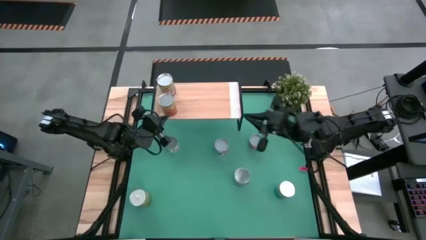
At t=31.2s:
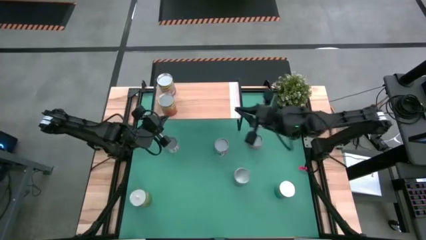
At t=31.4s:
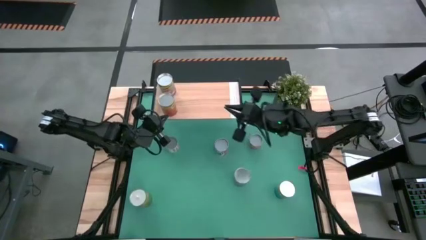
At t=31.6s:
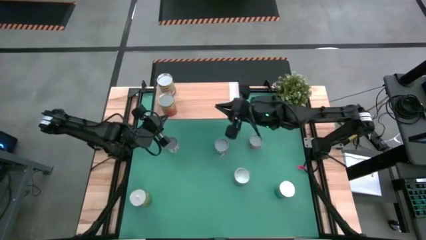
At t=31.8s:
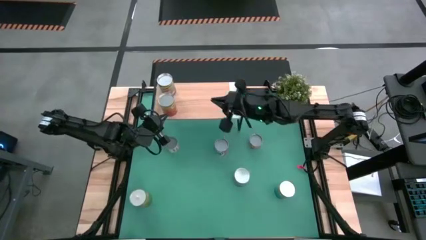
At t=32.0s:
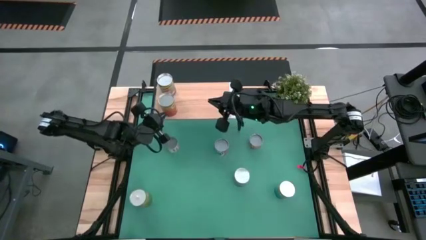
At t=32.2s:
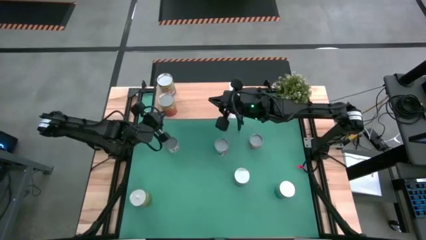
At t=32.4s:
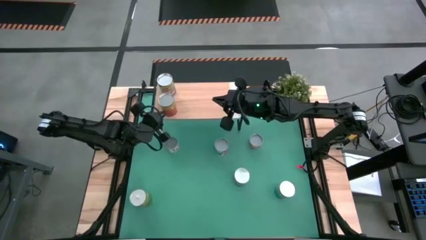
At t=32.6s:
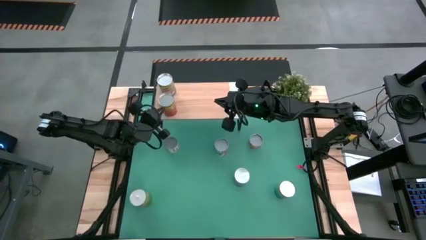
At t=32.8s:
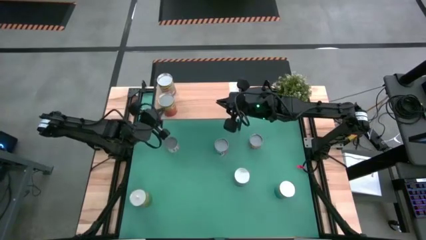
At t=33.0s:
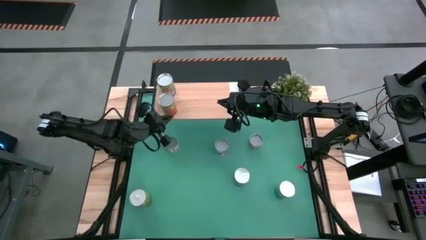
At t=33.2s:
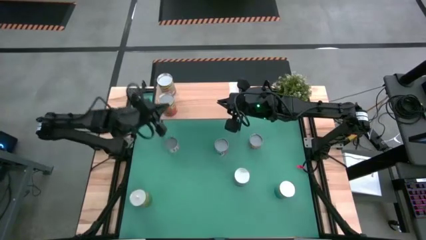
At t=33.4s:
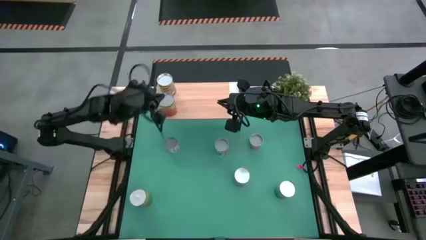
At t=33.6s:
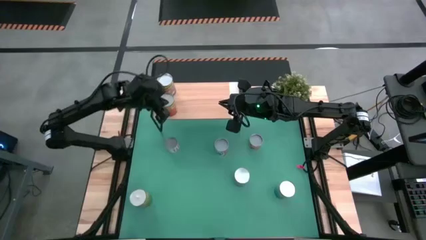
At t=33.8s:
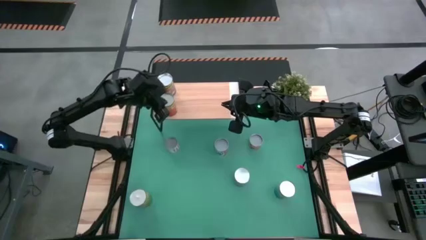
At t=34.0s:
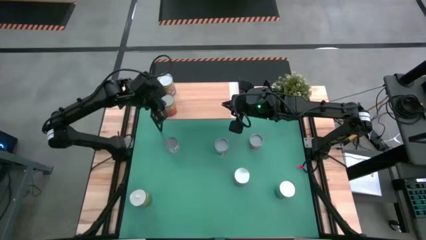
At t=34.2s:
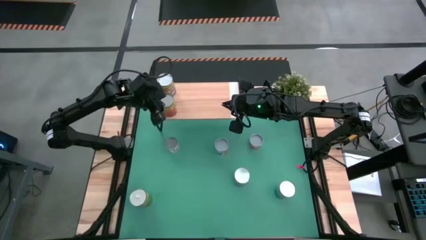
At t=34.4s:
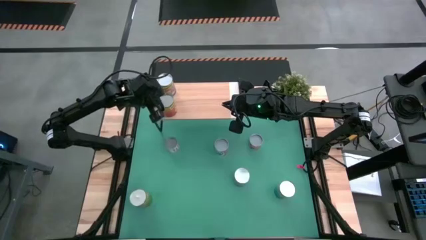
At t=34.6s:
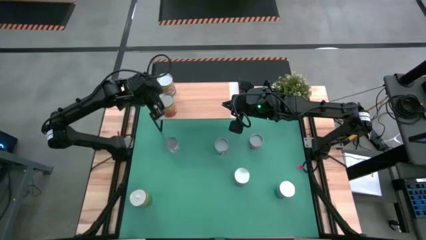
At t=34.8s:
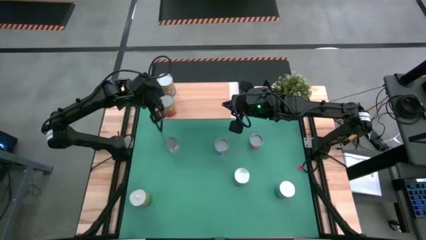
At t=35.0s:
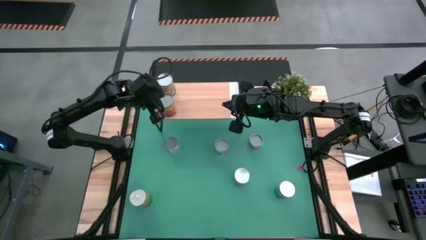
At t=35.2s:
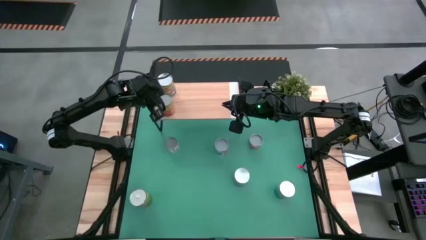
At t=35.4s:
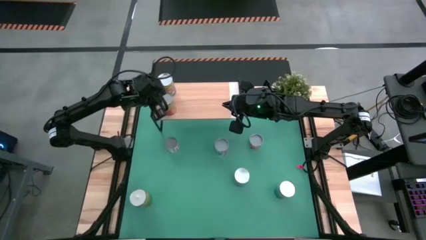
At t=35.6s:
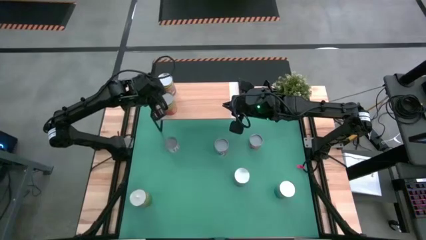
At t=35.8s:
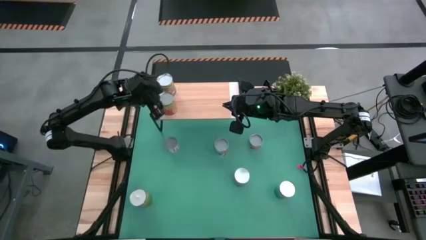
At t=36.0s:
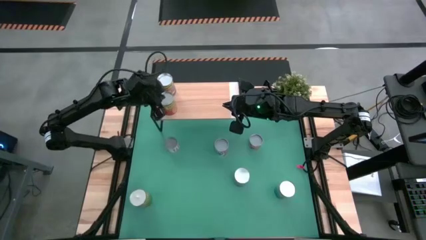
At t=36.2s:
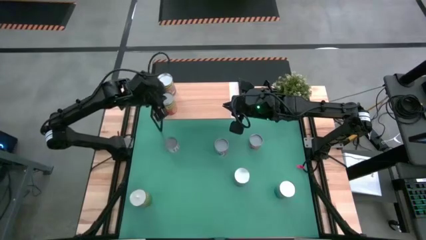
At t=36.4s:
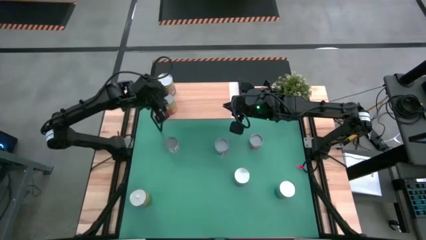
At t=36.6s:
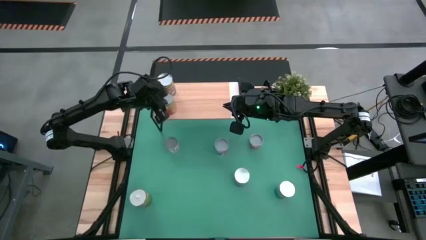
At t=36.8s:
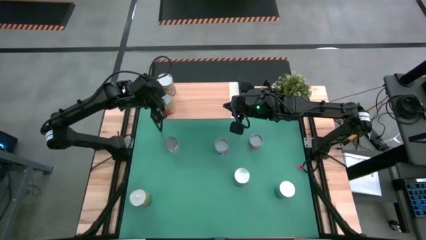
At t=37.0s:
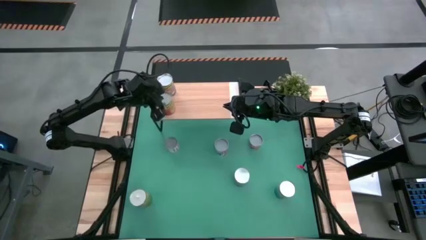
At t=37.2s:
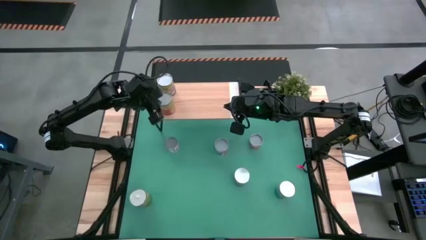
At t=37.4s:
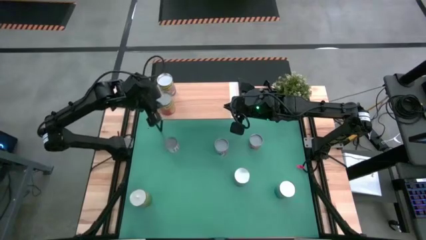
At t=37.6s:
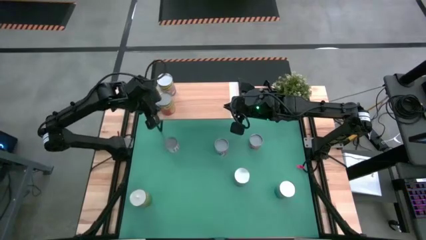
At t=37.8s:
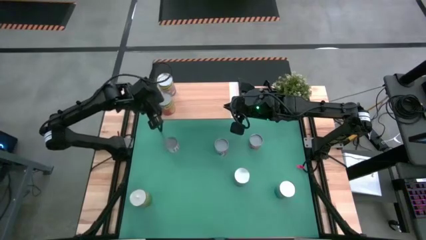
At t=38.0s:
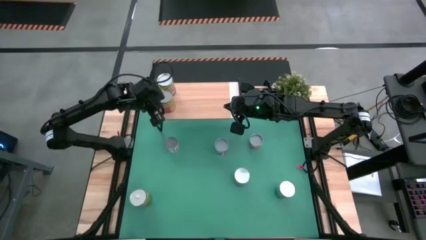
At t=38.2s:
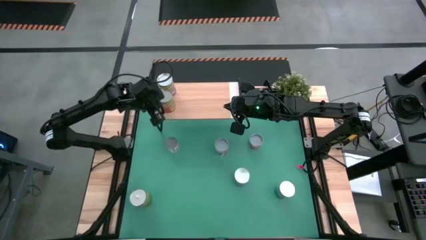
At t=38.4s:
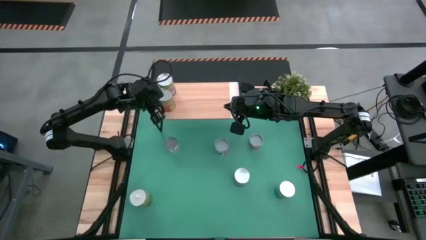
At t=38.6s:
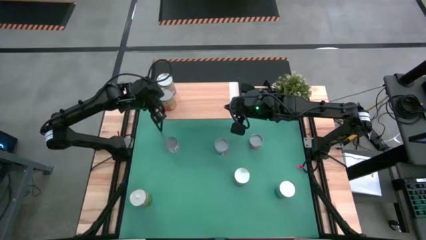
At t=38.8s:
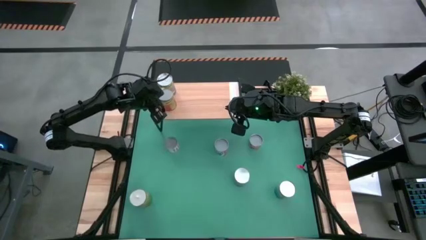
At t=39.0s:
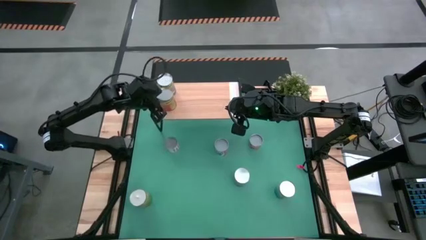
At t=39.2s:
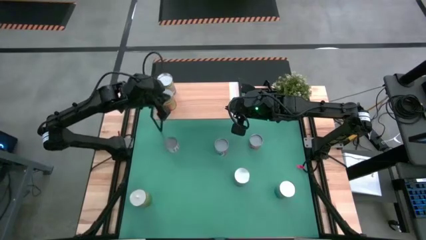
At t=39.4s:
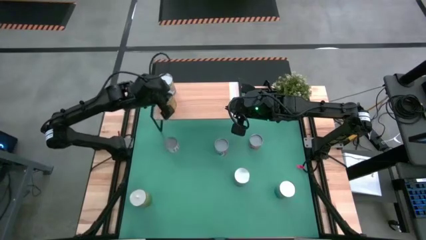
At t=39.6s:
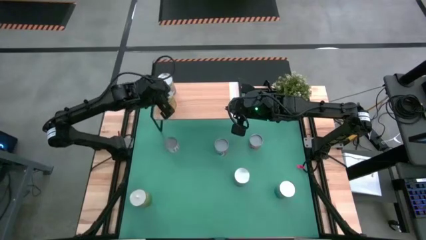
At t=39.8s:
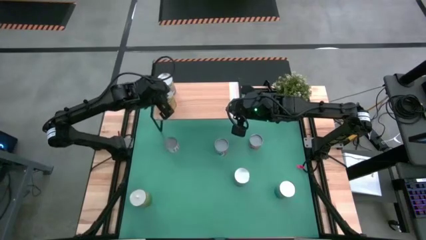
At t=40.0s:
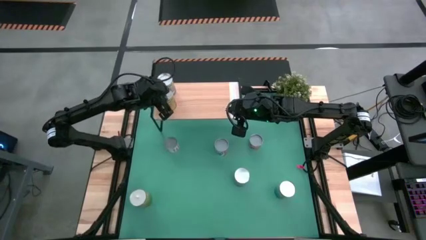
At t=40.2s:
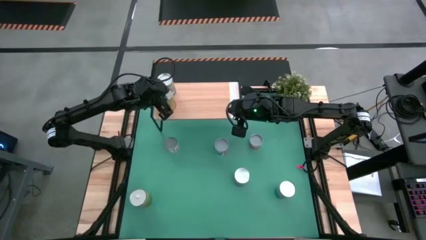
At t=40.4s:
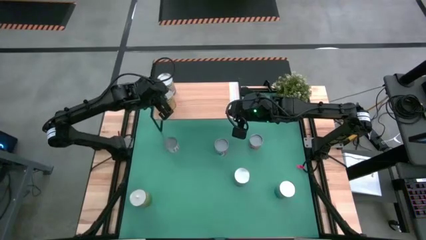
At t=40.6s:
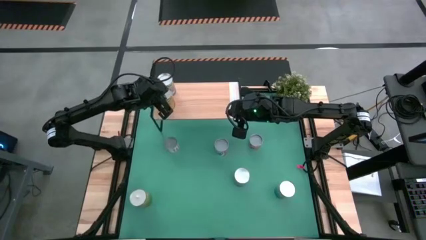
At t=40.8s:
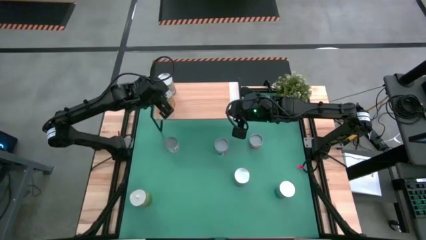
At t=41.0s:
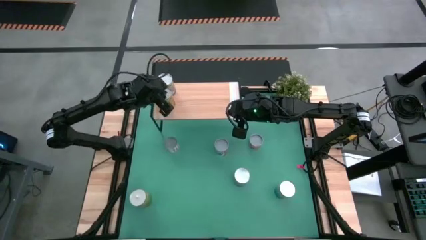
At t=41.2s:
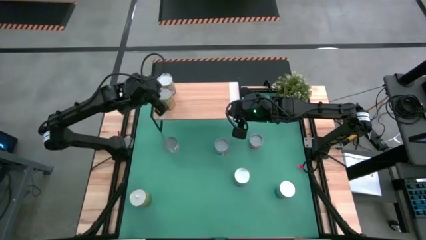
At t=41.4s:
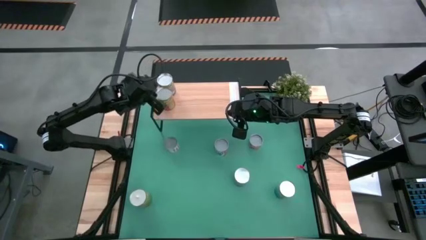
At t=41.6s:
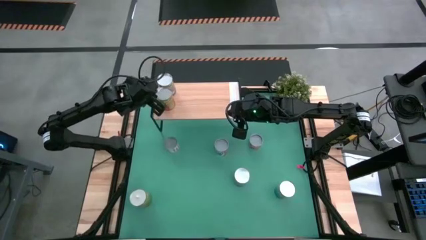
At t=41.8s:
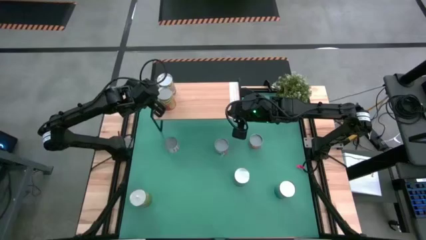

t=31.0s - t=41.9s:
Task: Pick and place cans onto a shelf
Put the canned pineapple on the shelf
